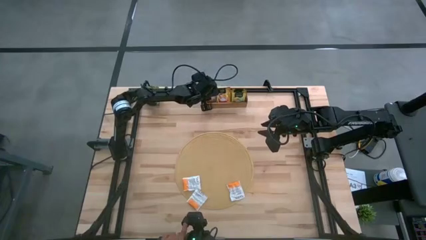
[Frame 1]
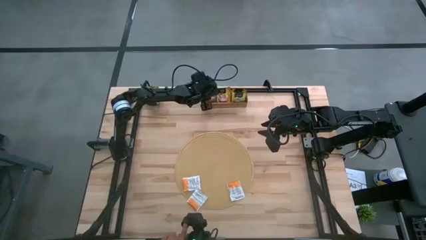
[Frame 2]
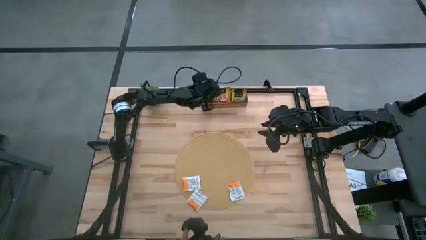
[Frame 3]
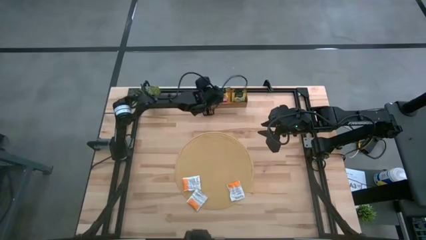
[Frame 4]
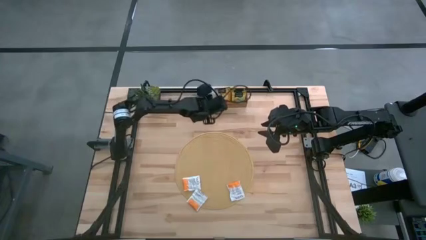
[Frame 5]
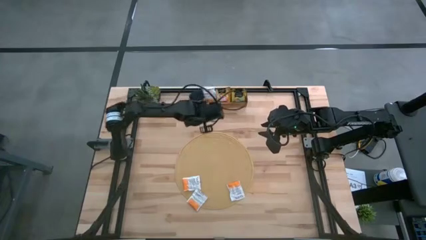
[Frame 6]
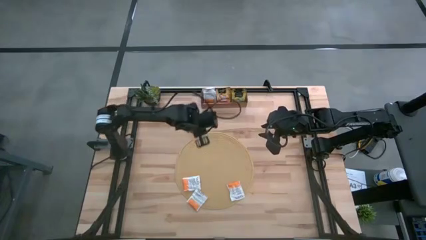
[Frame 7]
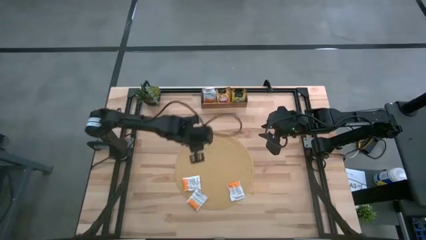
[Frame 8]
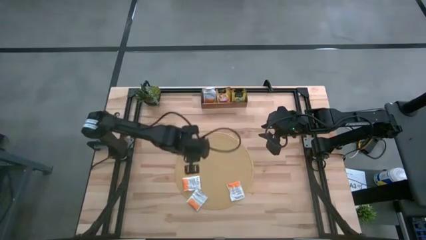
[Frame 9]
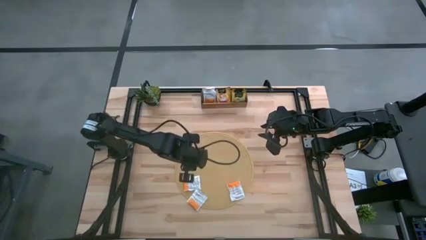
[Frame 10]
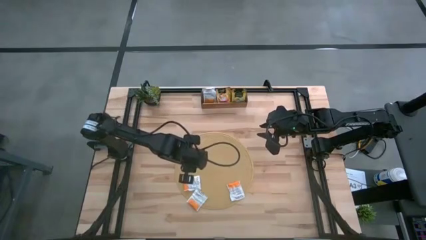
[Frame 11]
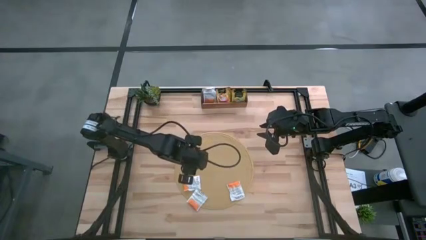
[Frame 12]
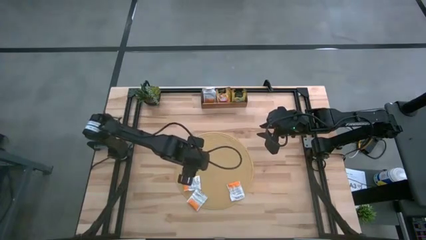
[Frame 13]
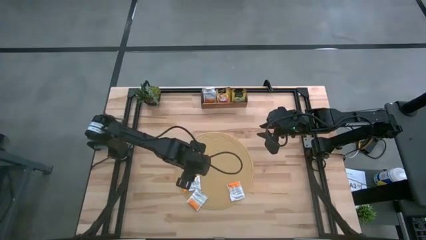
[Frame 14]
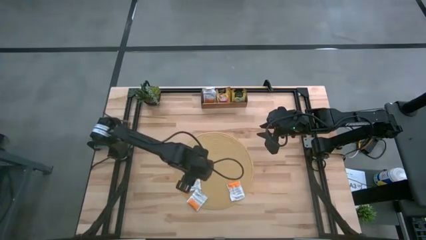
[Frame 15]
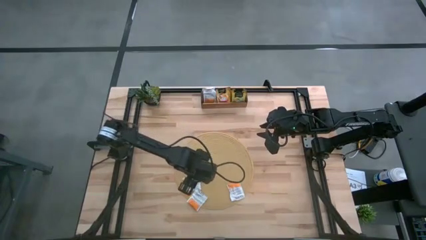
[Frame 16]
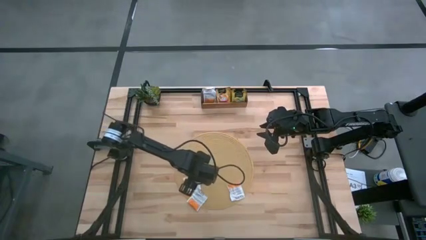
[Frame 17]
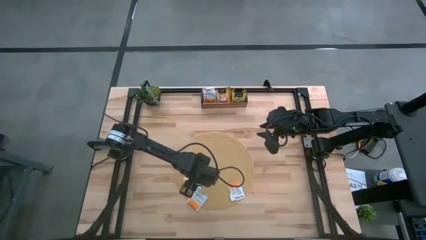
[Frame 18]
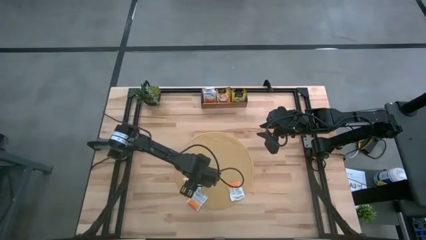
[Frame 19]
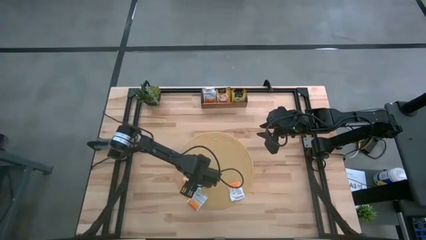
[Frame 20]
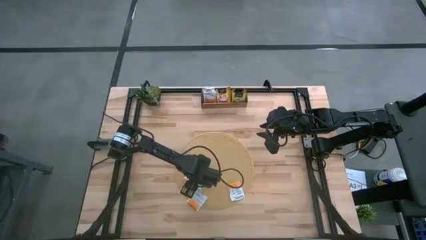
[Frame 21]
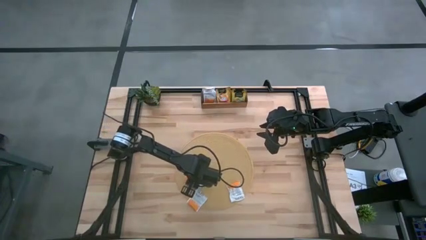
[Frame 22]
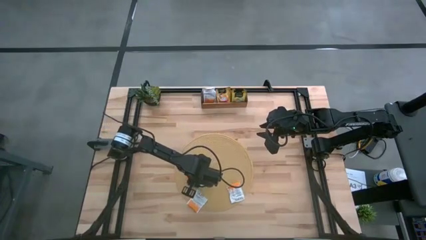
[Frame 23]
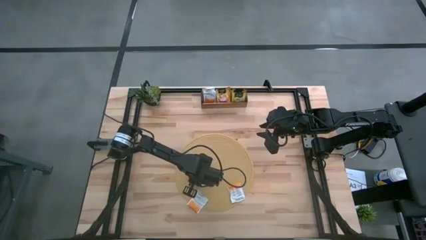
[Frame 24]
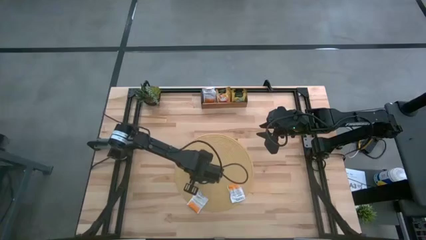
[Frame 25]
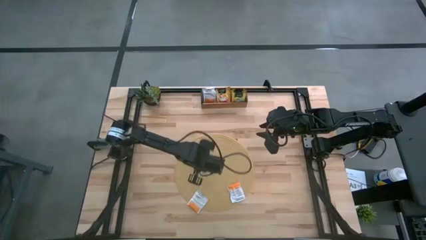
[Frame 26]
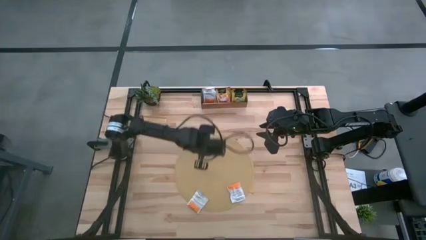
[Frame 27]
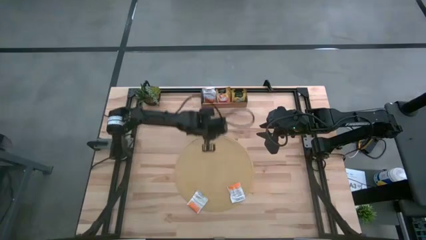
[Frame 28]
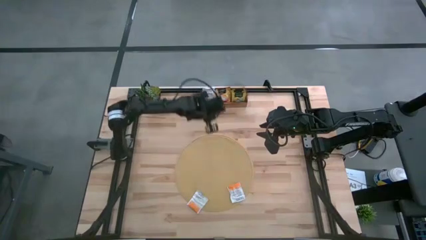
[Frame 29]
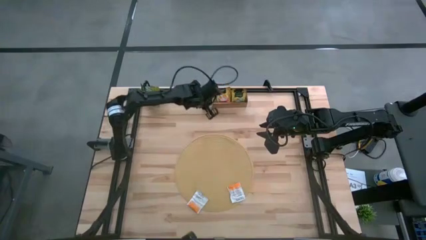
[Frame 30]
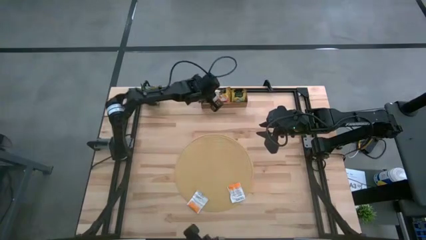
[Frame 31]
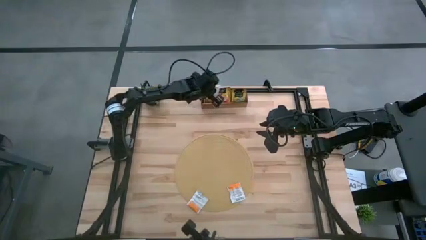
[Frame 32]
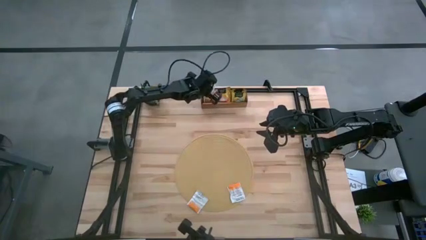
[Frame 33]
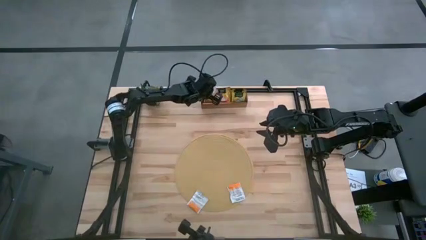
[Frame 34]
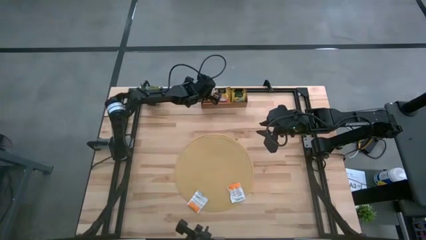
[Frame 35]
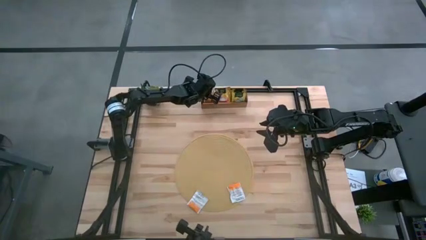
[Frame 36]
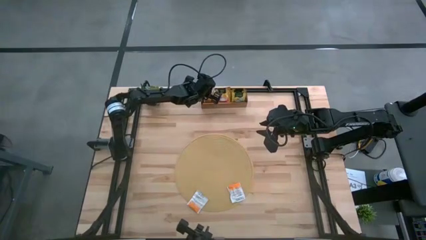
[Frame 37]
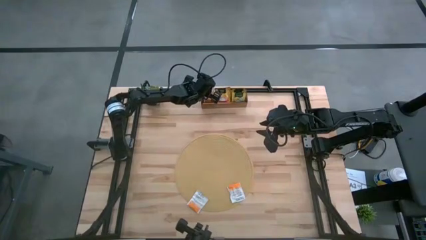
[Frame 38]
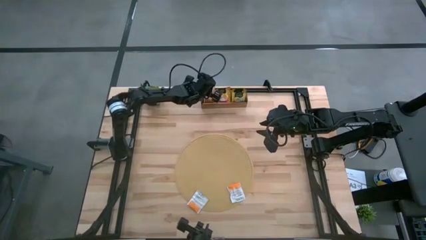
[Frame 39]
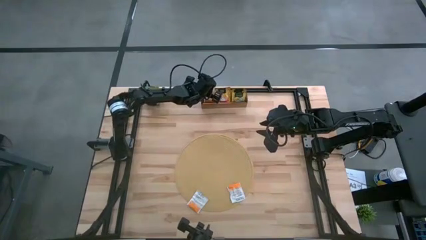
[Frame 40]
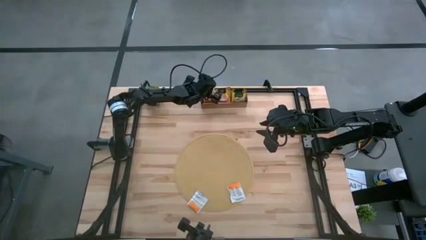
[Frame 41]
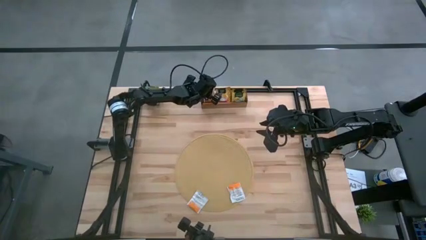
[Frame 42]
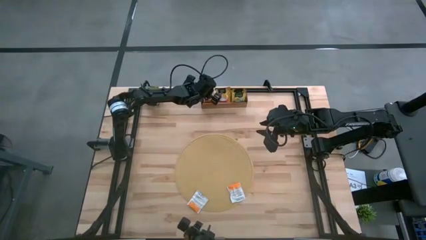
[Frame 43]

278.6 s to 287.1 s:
Task: Pick & Place Tea
Put the top orange tea bag into the left section of the wooden organizer

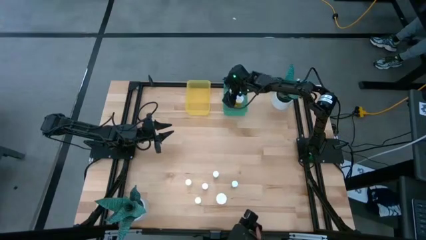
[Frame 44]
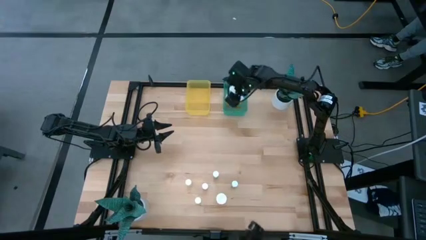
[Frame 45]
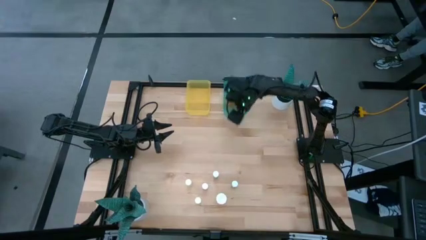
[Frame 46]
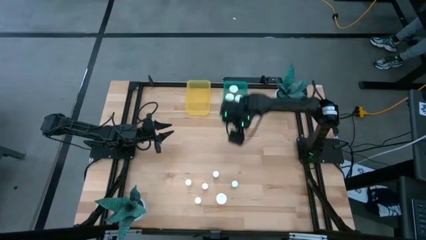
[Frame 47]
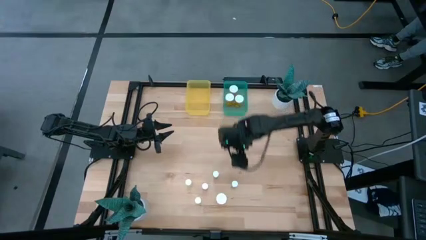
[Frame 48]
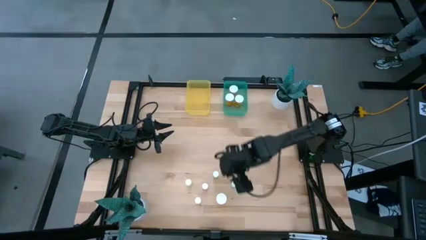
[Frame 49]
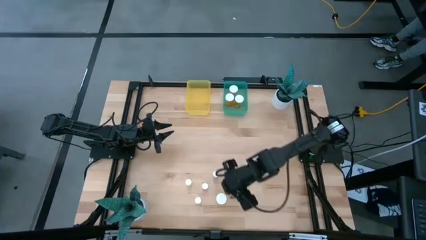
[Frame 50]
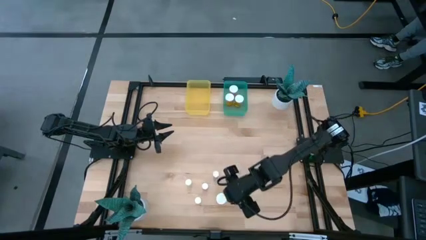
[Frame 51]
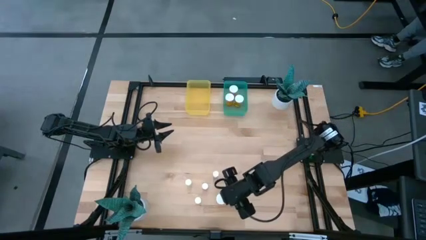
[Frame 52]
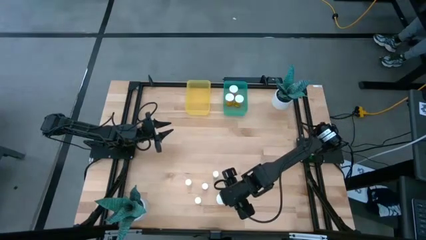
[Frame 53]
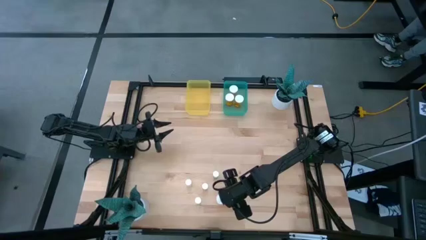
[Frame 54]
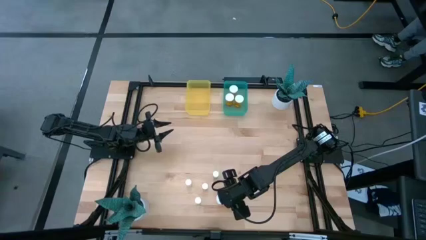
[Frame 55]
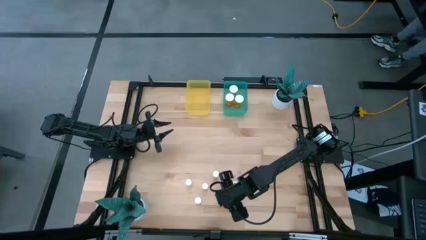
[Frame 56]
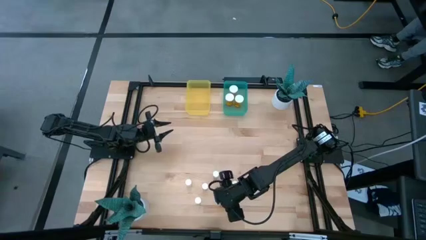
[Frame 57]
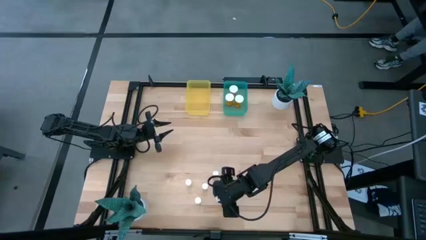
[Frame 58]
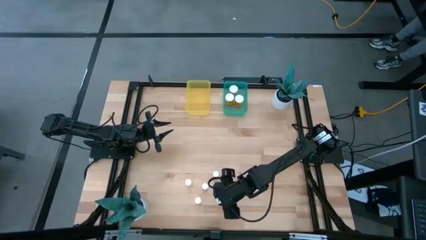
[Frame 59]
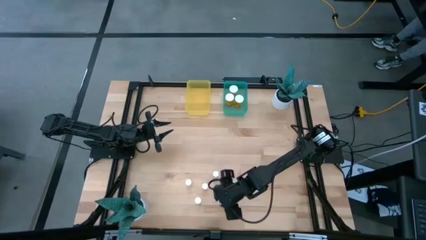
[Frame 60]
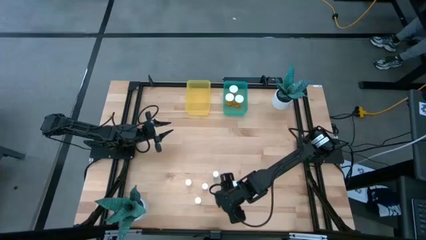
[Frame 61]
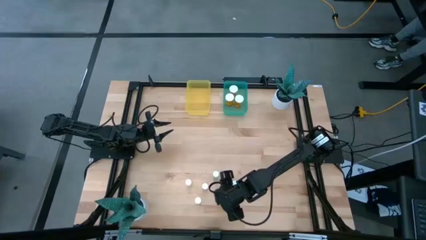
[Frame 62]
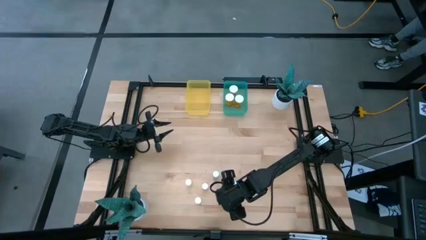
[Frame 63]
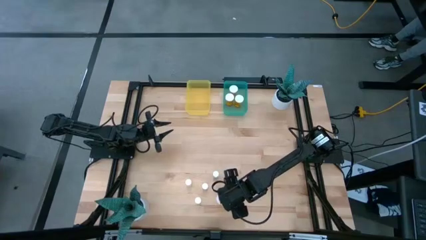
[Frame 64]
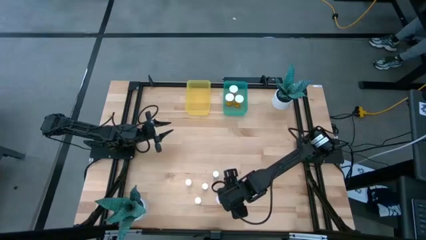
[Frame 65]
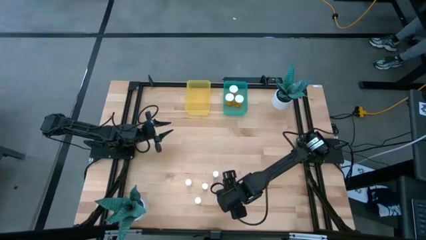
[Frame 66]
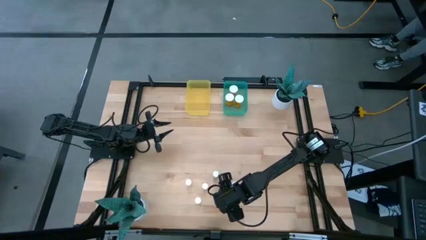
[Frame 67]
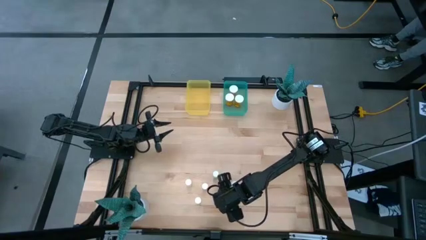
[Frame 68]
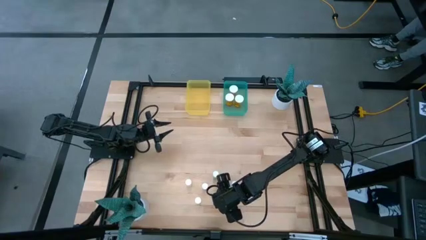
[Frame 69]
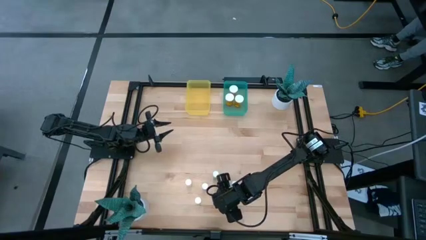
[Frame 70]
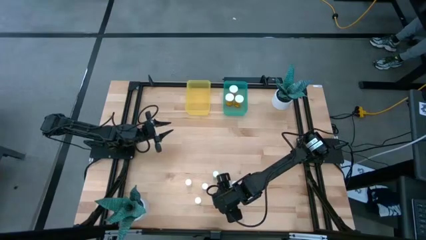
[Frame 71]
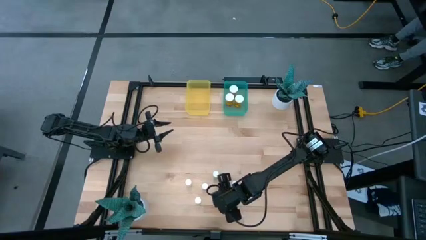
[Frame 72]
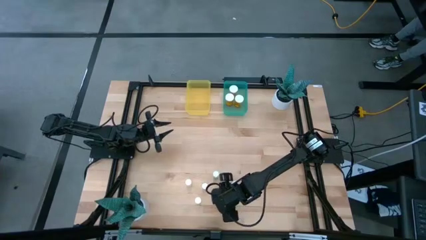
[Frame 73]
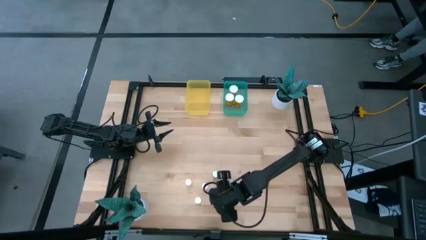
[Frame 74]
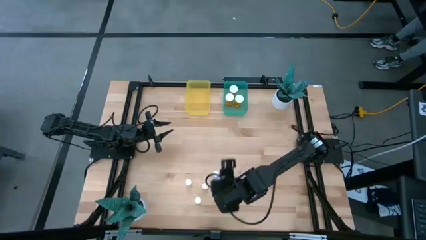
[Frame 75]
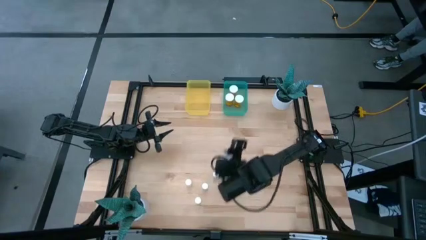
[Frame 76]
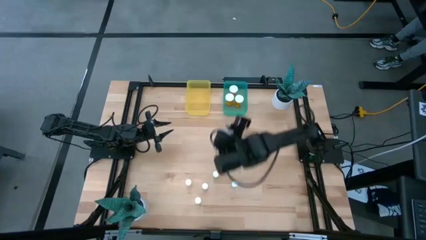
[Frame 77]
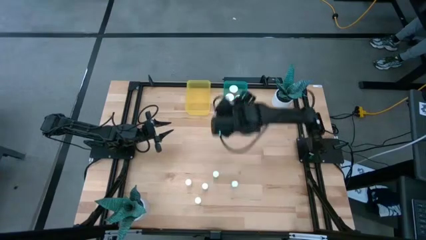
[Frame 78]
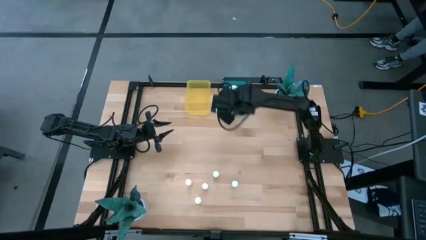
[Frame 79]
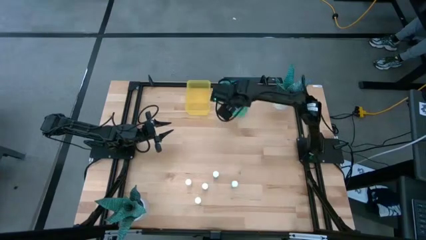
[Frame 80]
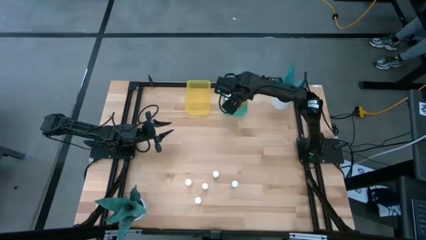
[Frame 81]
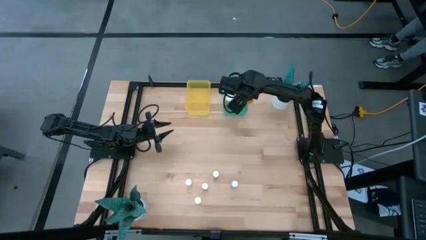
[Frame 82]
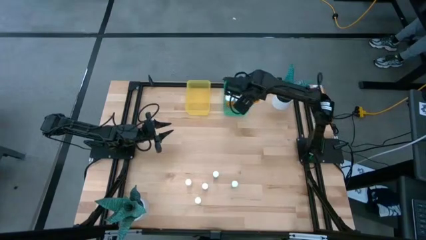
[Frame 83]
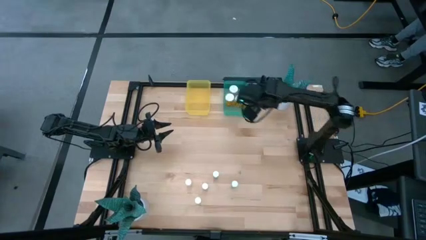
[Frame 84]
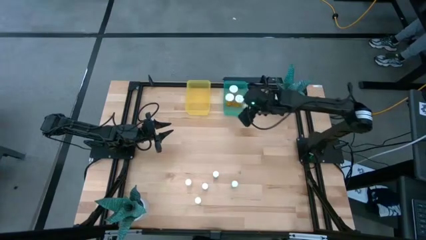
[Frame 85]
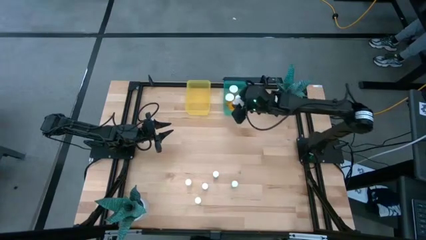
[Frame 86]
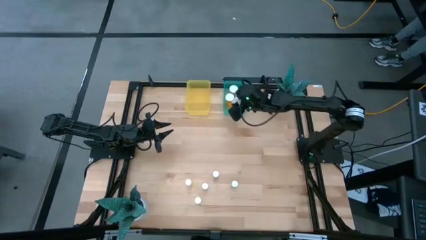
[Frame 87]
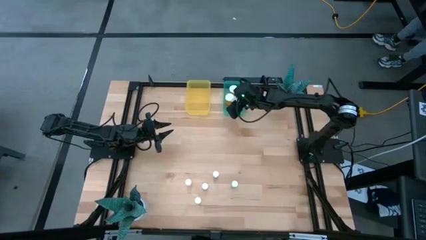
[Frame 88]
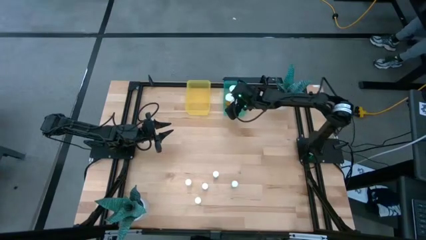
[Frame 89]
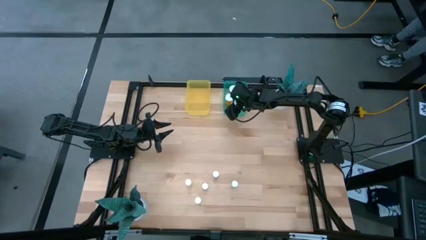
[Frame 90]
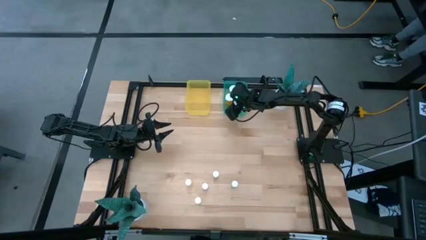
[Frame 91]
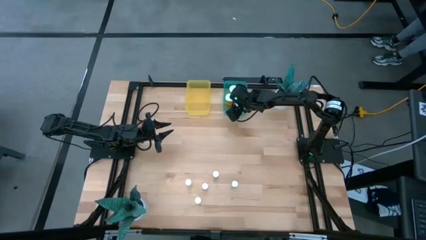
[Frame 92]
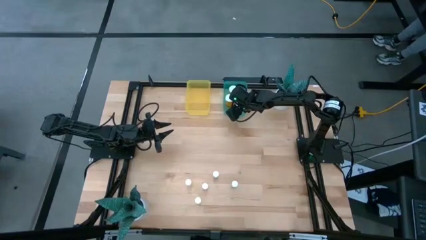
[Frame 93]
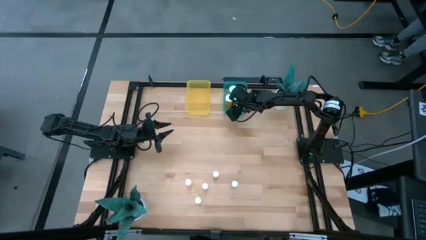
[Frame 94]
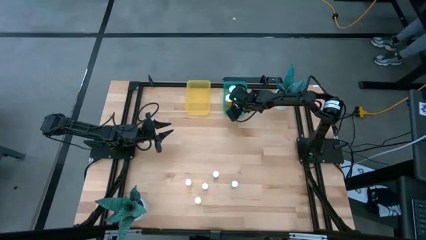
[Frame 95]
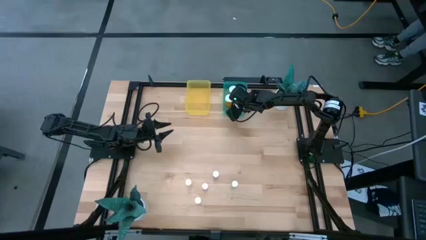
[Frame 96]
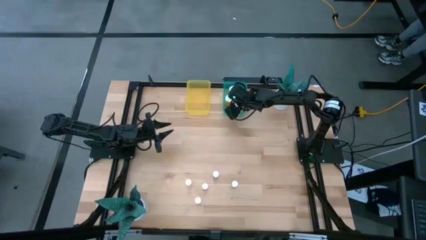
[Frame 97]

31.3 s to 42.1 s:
Task: Pick and place medicine bottles into bin by pill shape (circle, oval)
Put the orange capsule bottle into the green bin
